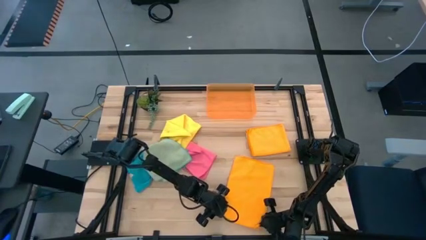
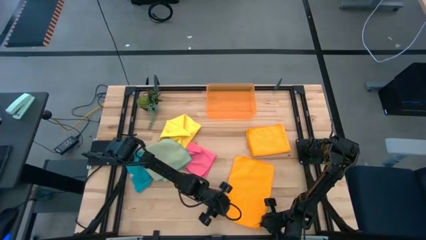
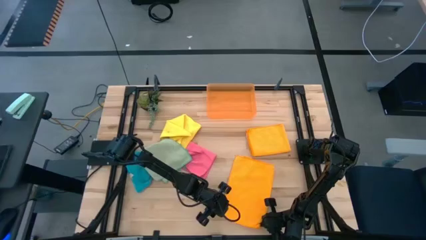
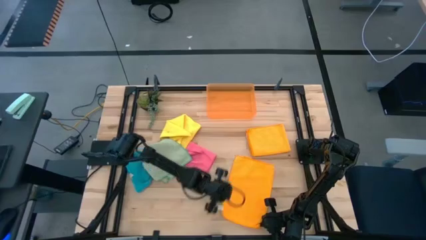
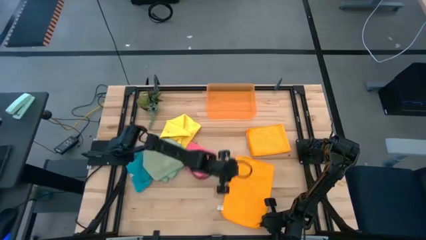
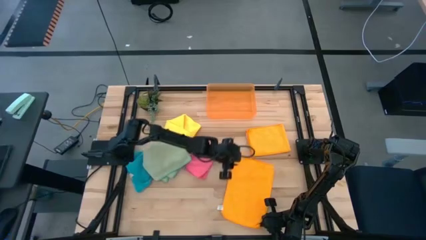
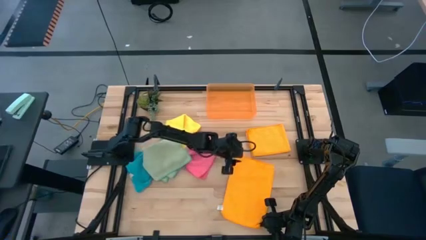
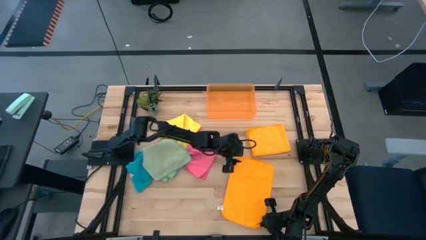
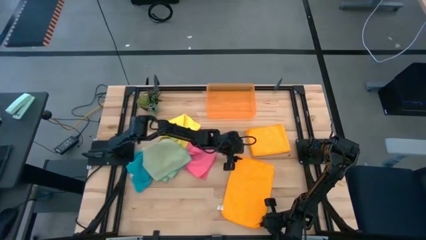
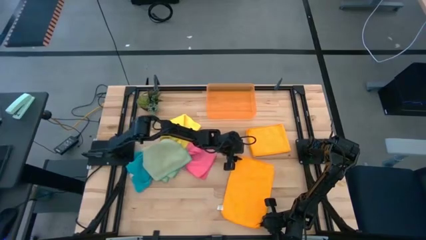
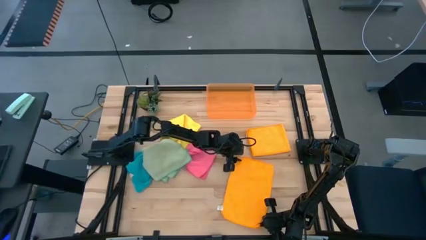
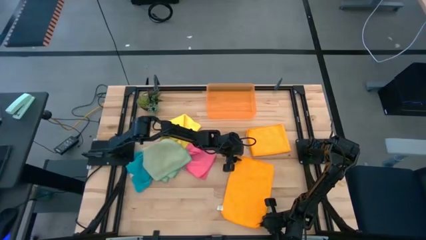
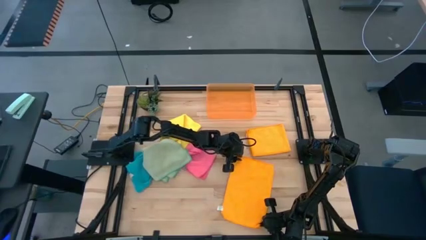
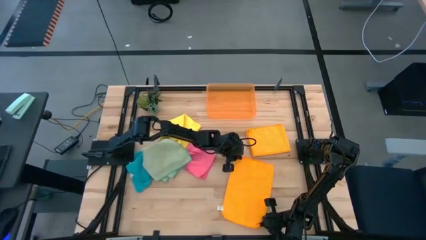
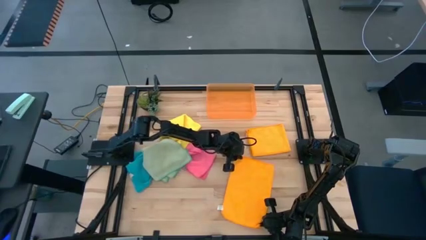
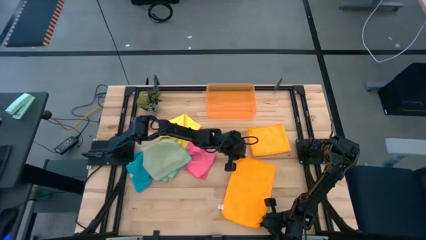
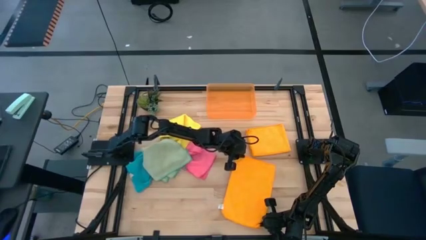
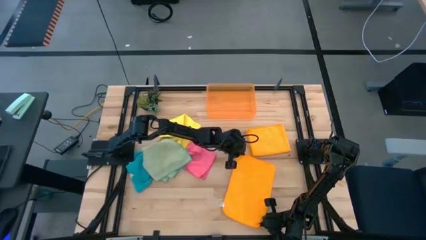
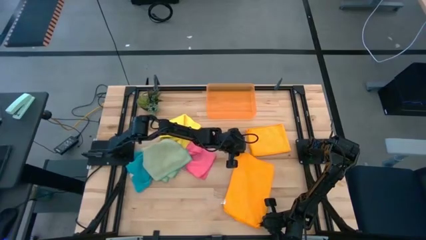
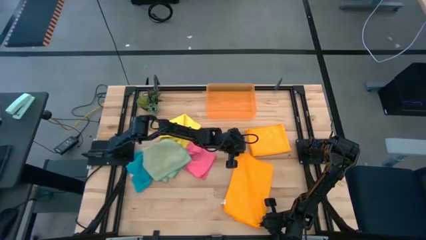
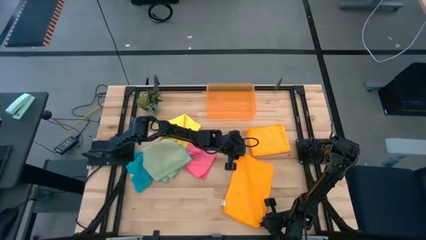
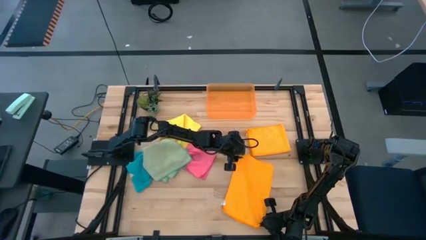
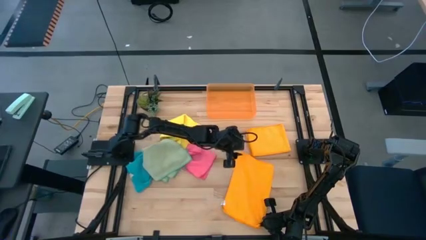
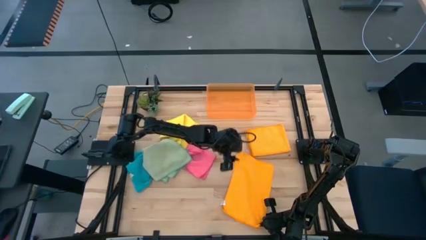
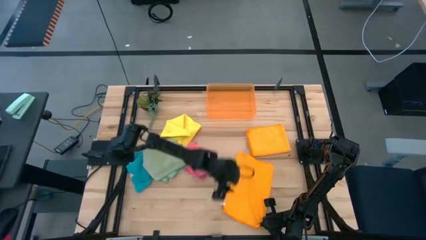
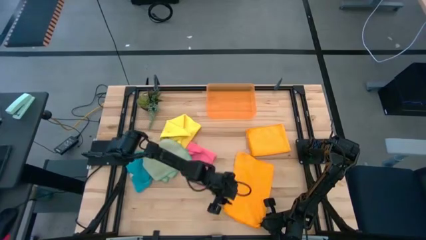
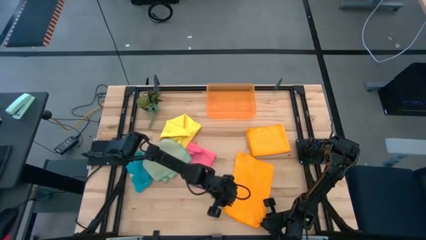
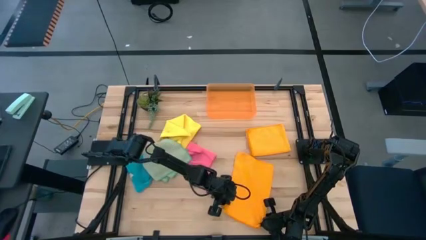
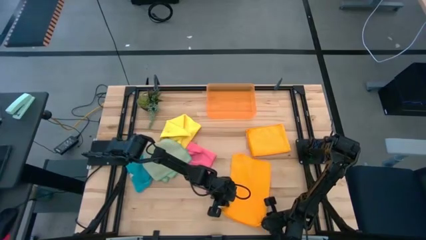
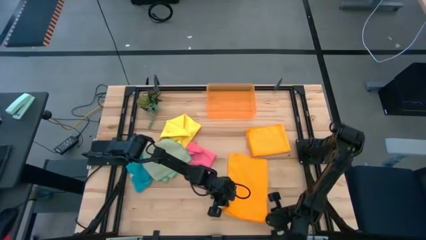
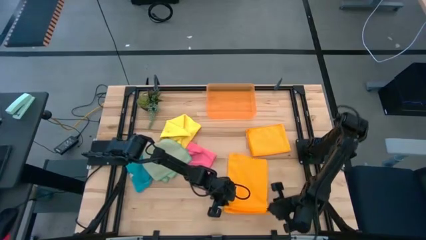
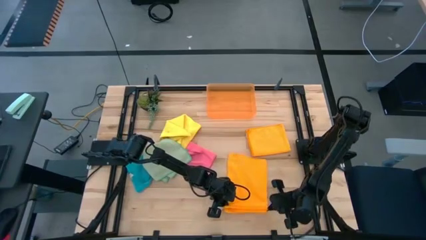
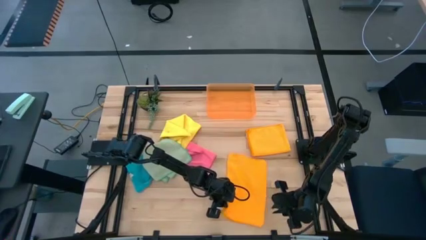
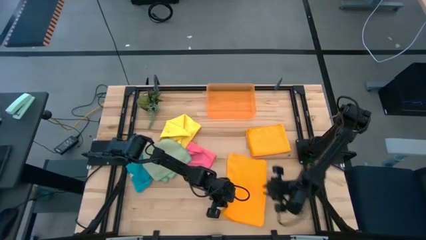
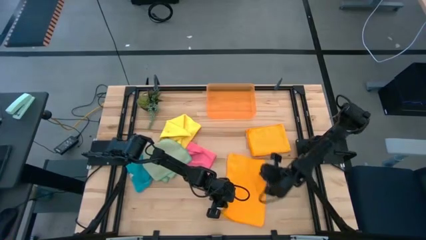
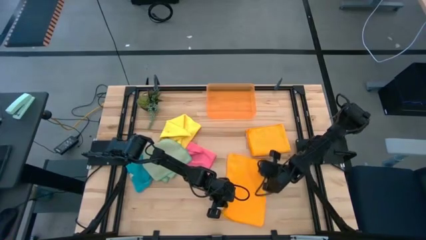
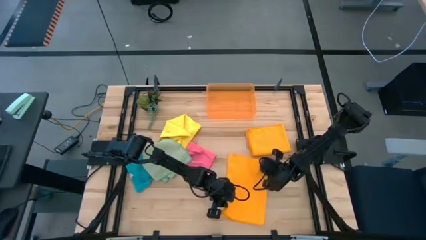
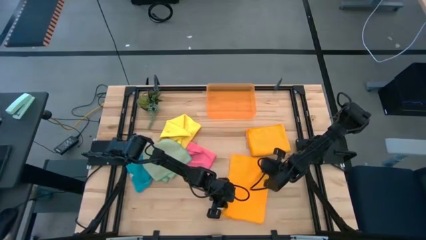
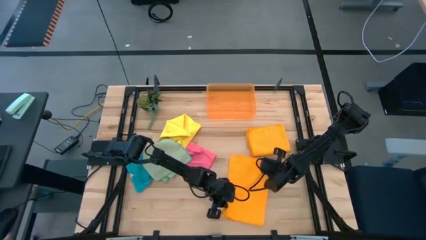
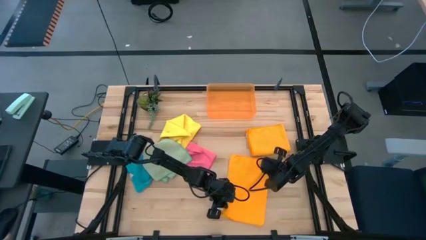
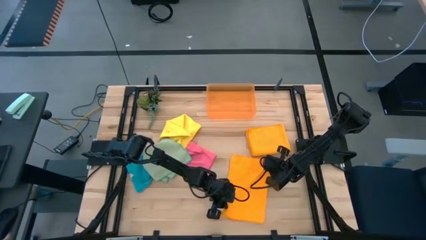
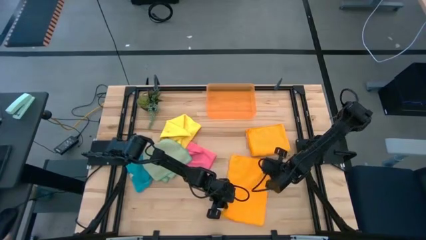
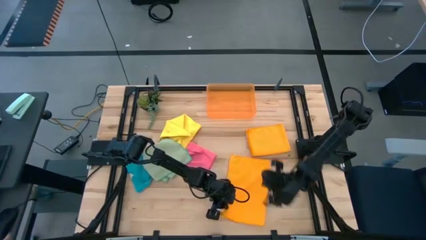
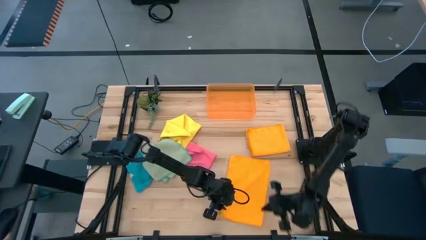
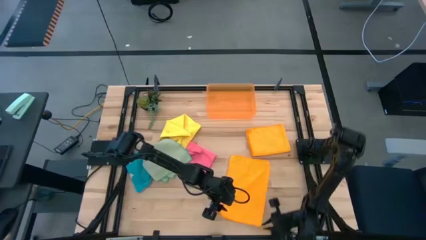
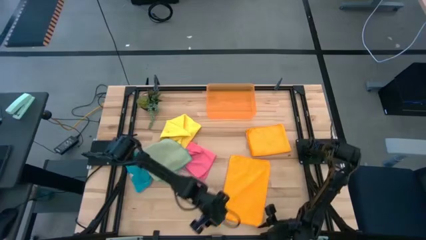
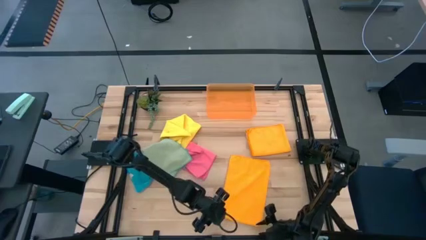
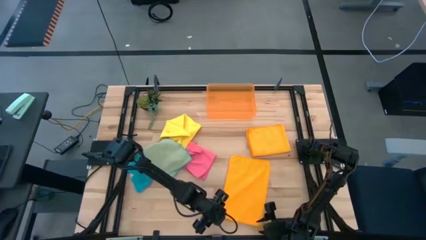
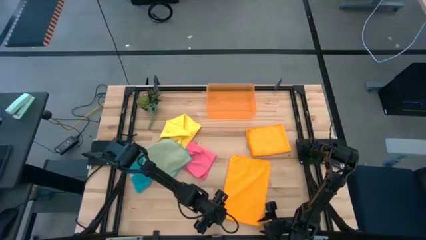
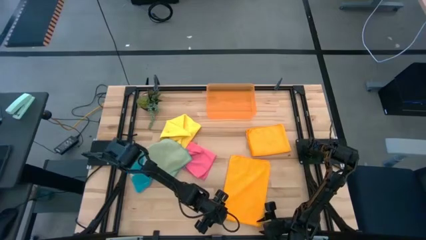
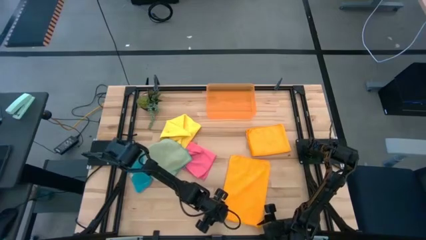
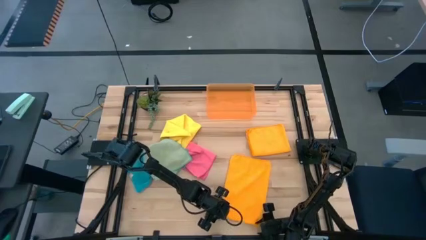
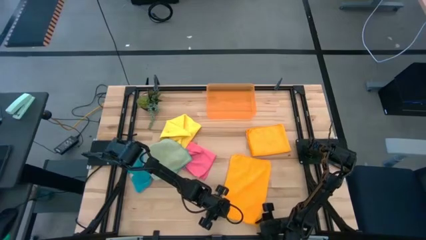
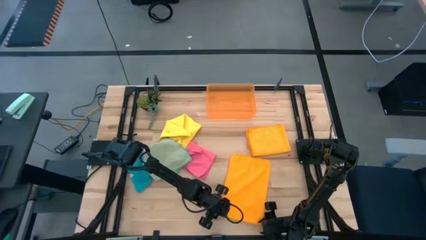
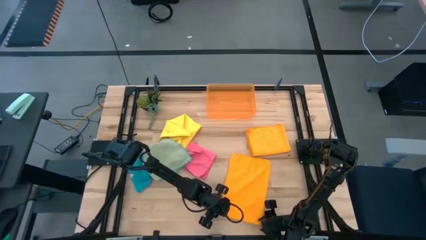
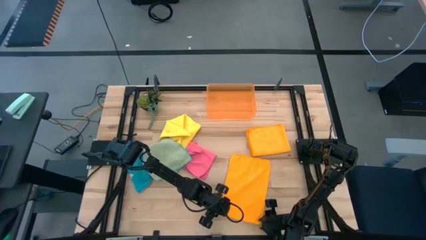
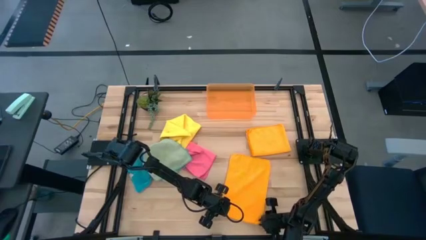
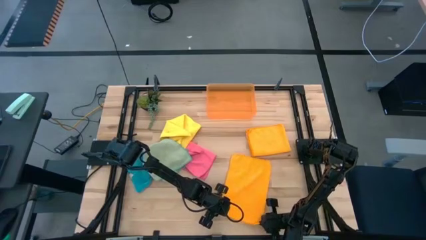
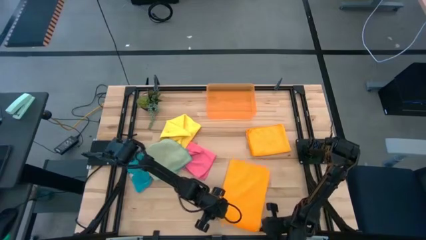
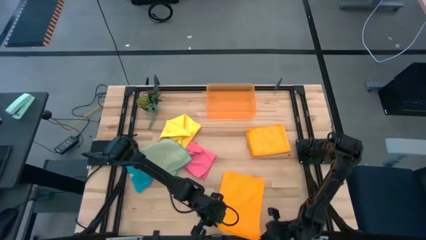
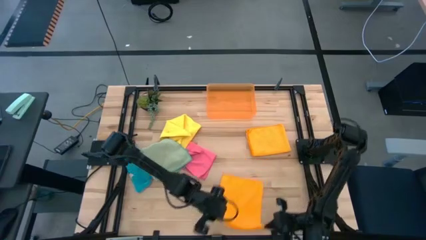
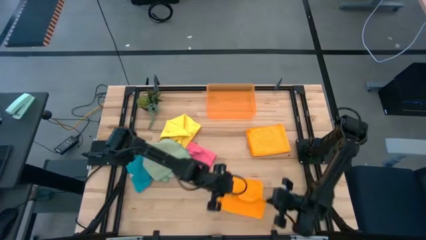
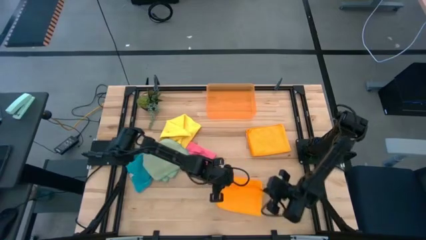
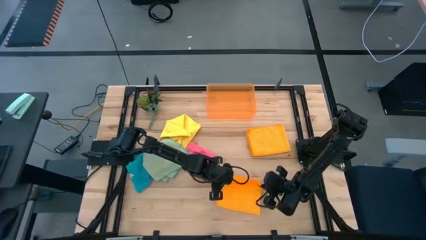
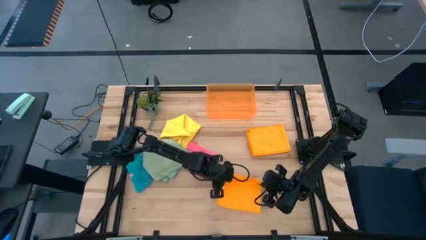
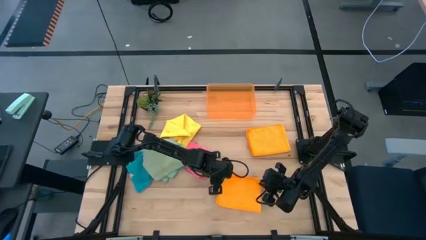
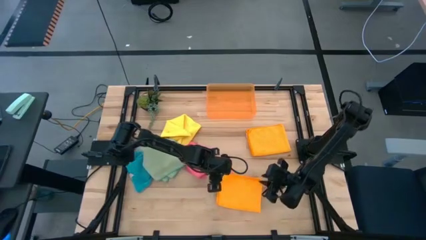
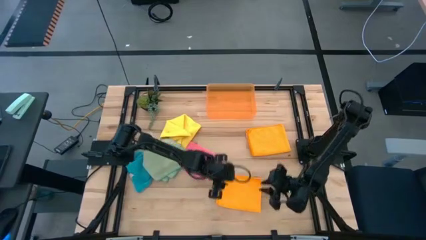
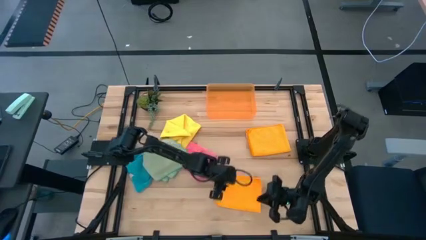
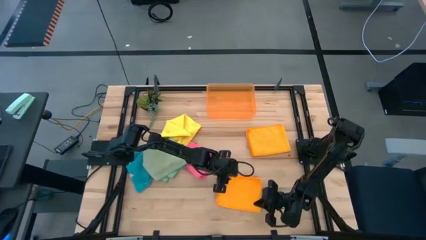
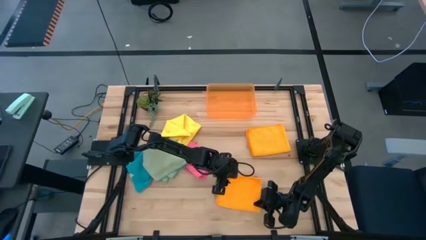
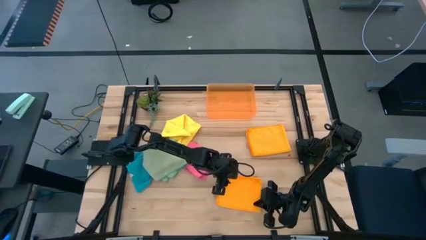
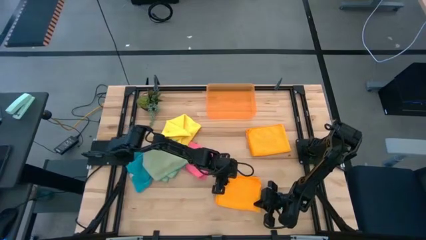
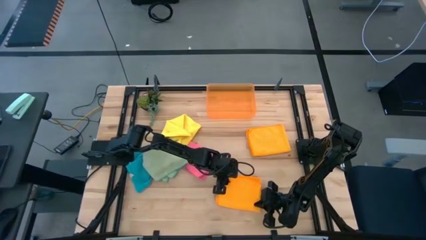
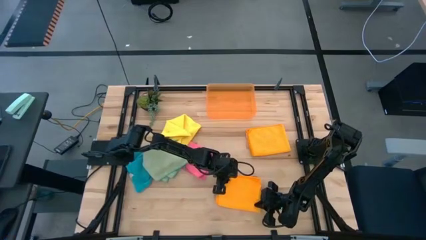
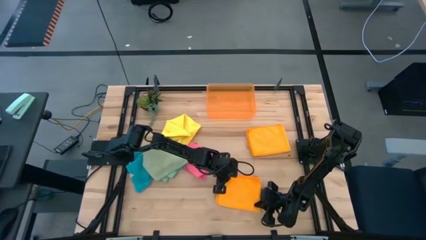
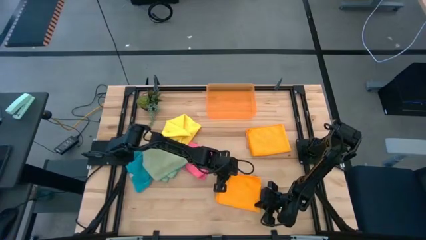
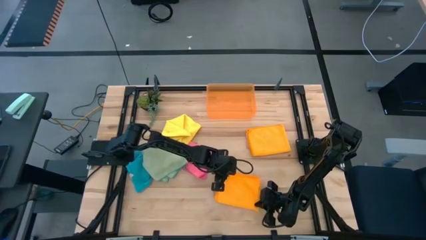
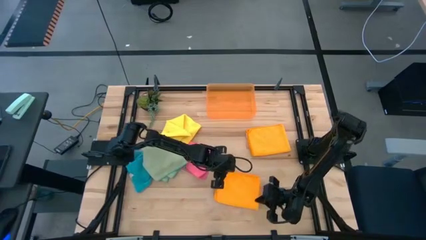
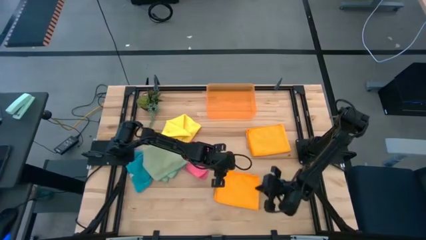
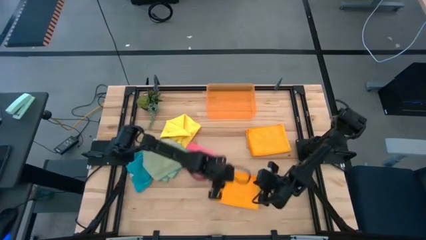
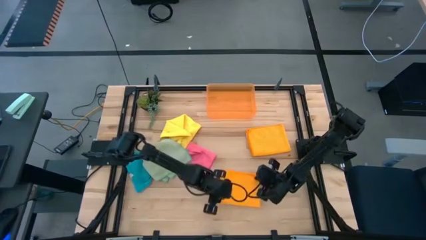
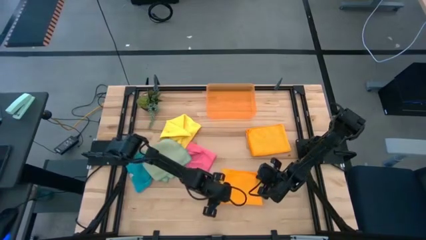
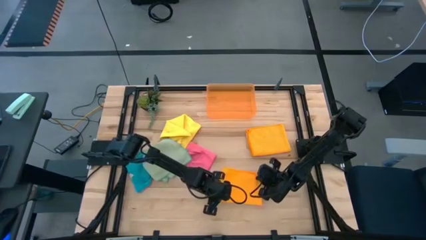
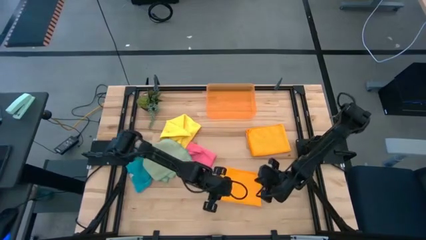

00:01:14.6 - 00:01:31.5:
Task: Fold microfiber towels
Fold the left orange microfiber cloth
